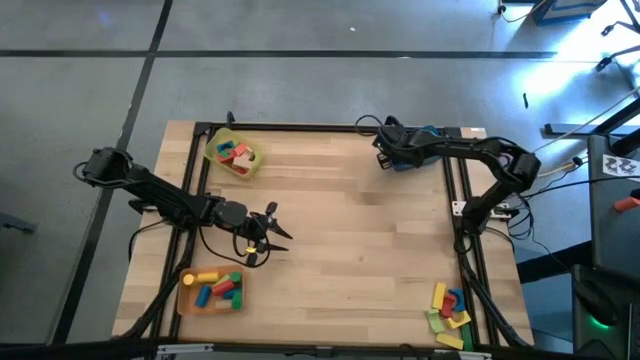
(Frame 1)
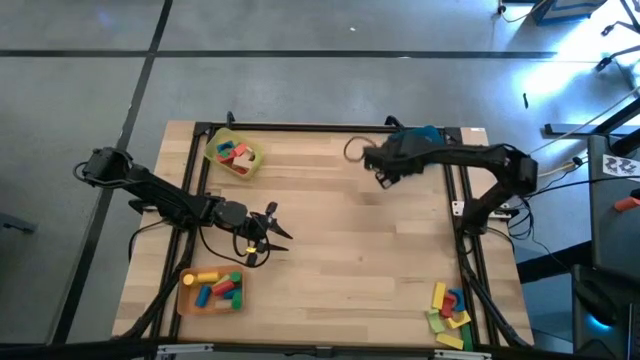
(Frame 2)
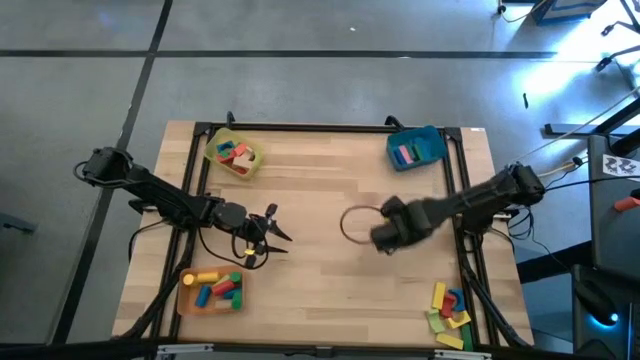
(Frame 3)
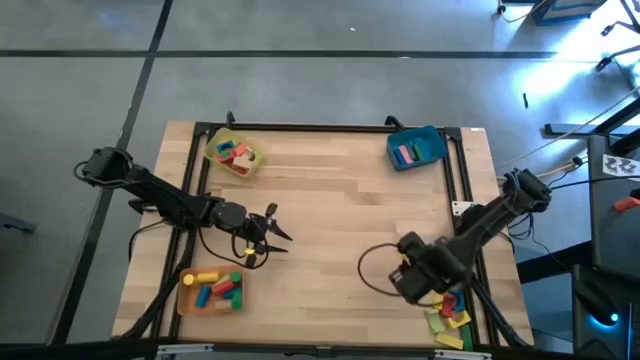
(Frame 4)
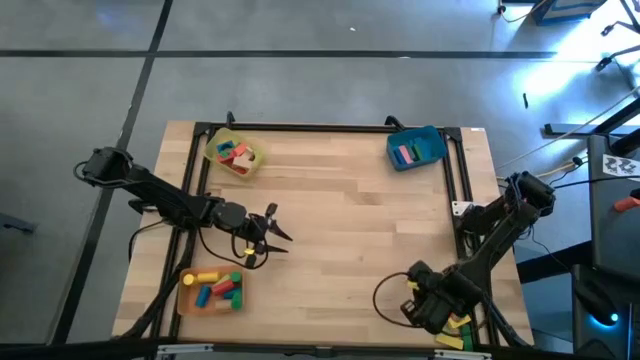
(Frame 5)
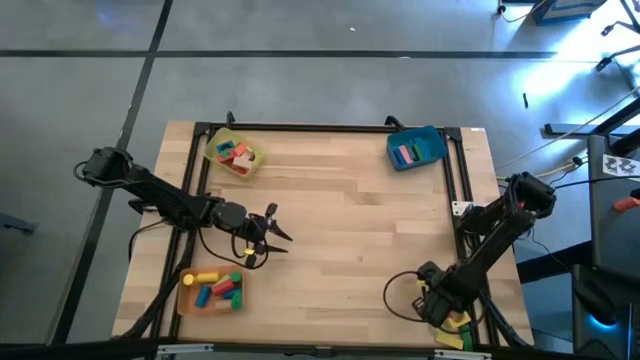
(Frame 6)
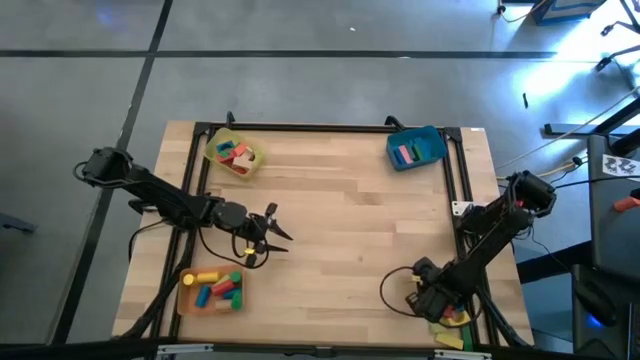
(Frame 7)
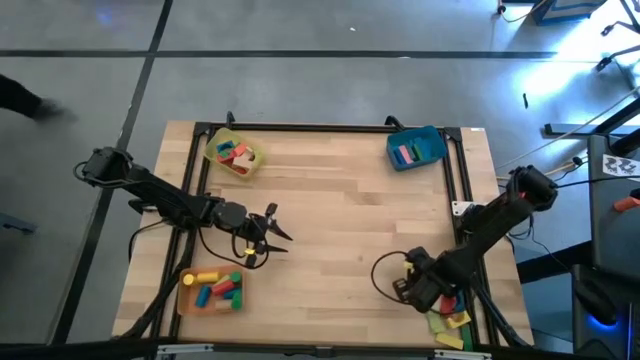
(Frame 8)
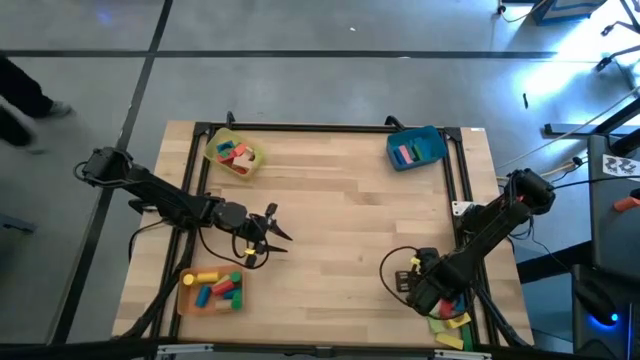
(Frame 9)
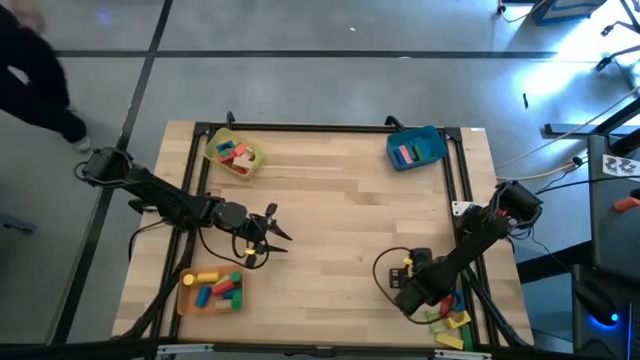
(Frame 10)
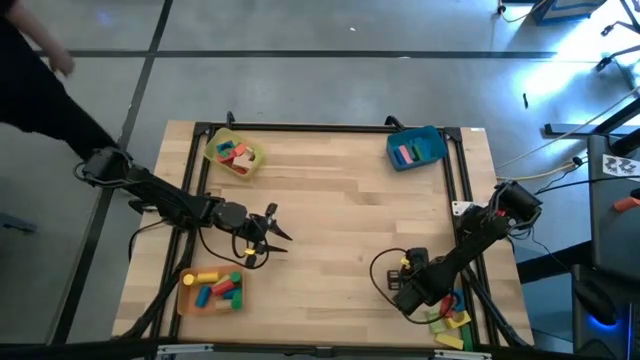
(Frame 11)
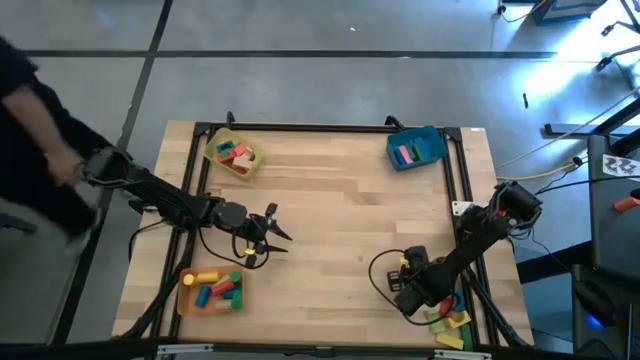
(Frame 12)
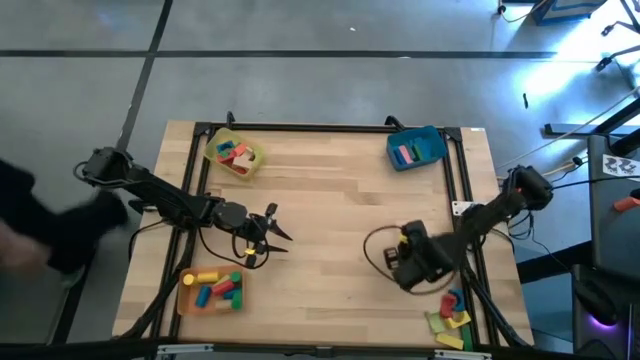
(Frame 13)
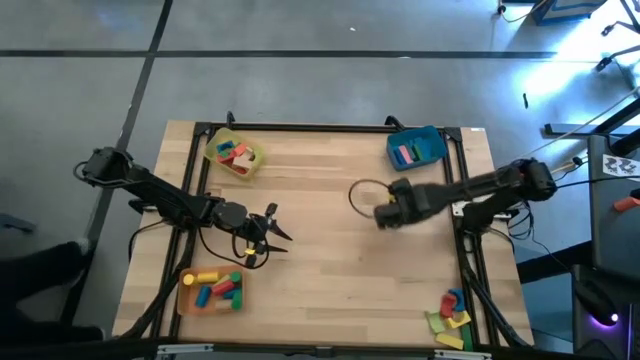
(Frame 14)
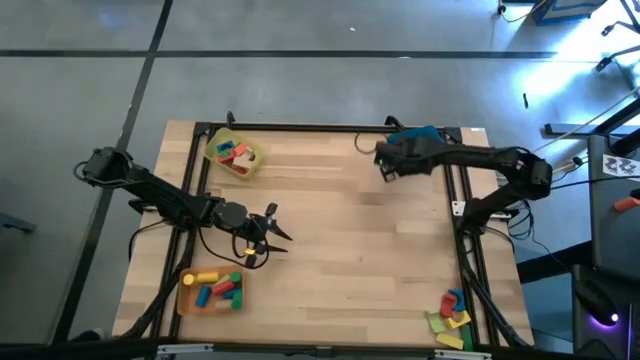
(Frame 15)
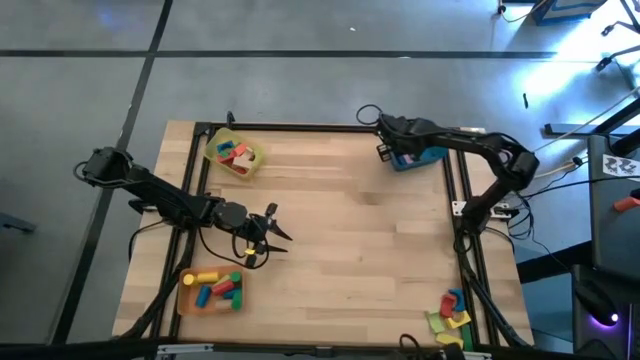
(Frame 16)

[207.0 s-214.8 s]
Task: Sort blocks by size
Put the yellow rectangular block into the blue bin

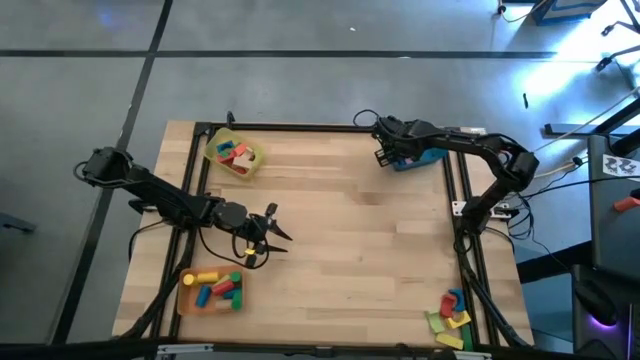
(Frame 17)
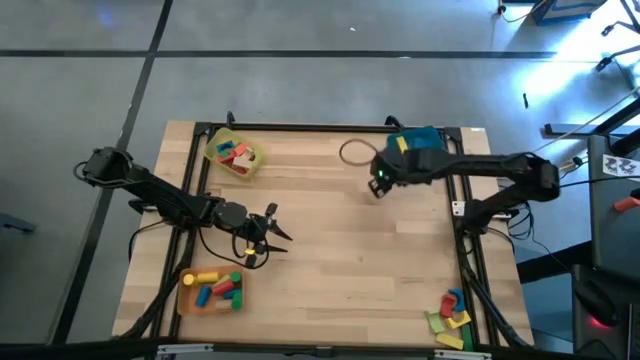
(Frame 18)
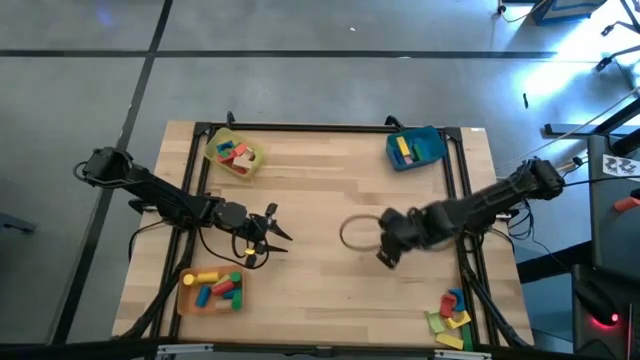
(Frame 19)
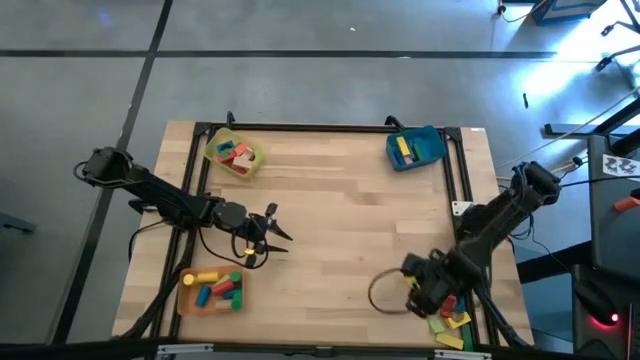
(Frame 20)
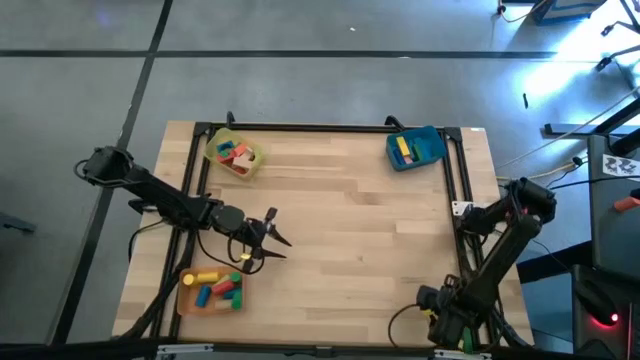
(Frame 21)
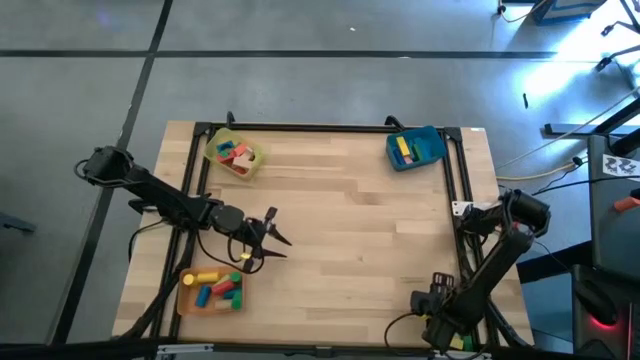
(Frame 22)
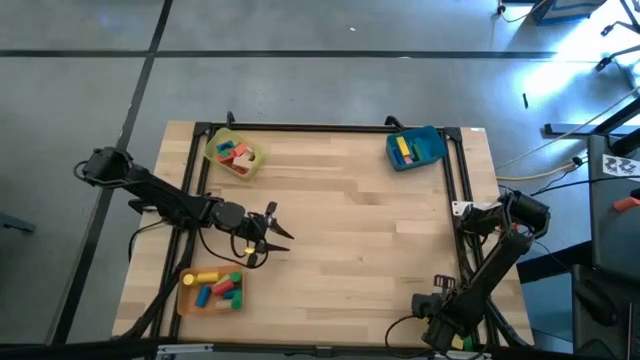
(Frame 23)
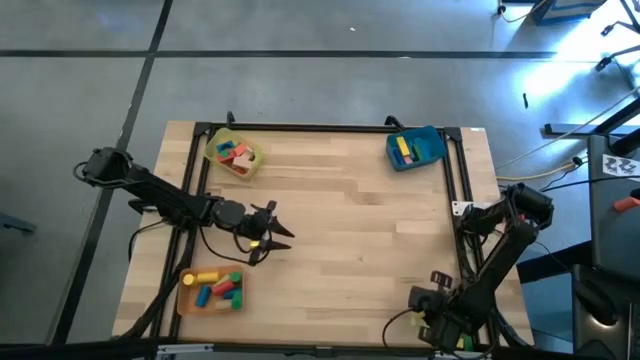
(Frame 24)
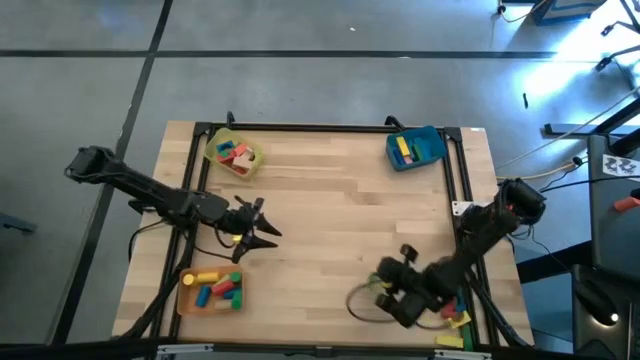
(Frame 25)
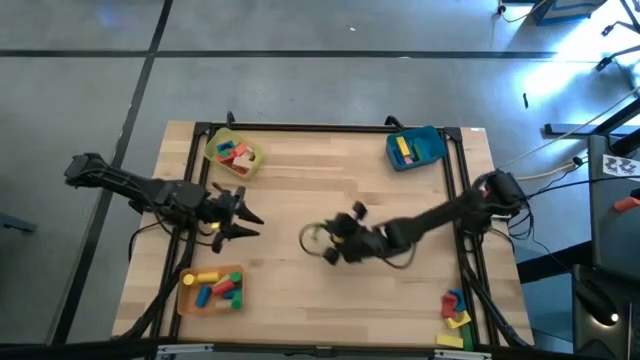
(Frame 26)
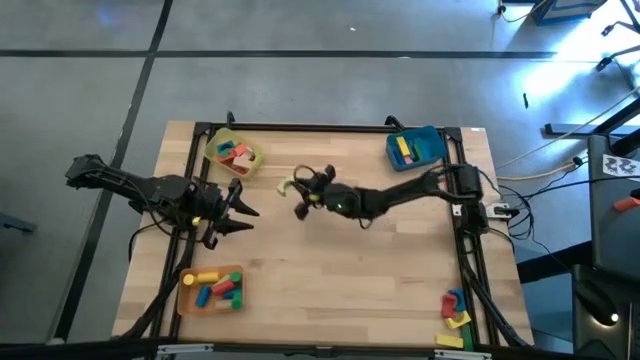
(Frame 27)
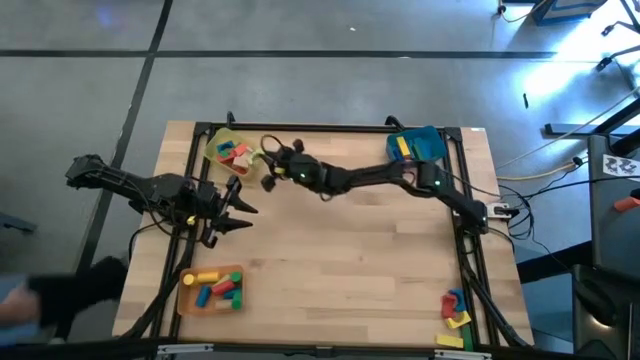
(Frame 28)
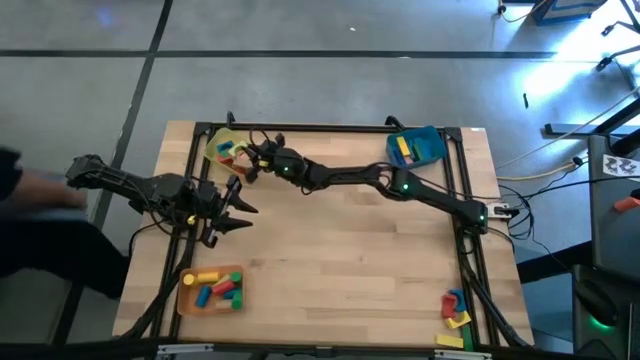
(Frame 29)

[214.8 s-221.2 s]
Put the light green arch block into the yellow bin

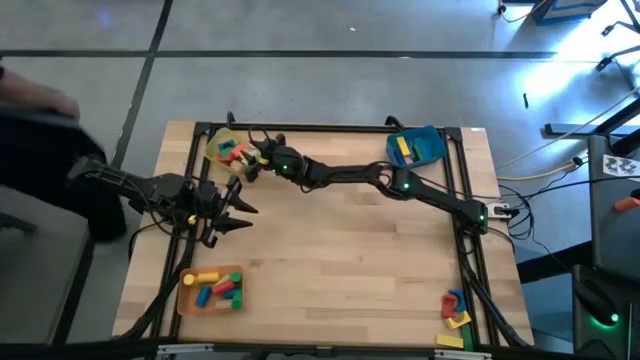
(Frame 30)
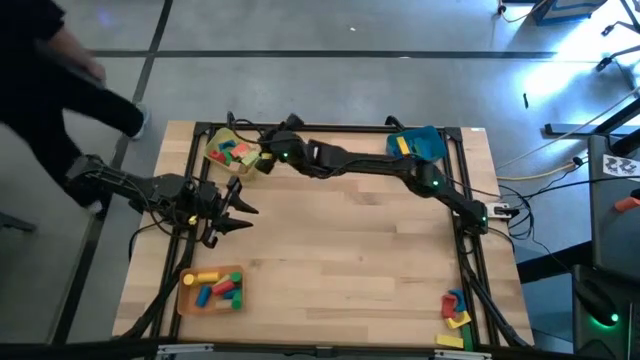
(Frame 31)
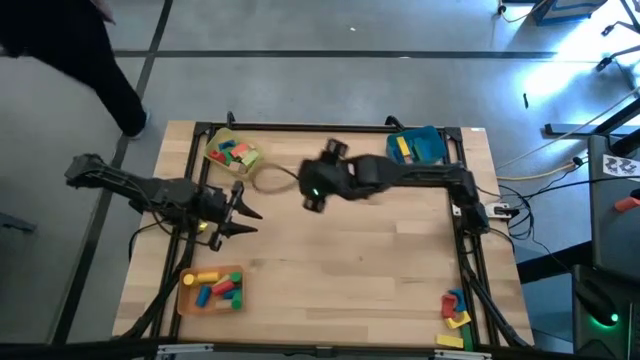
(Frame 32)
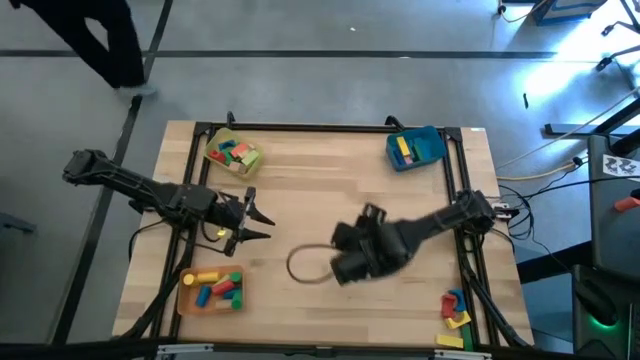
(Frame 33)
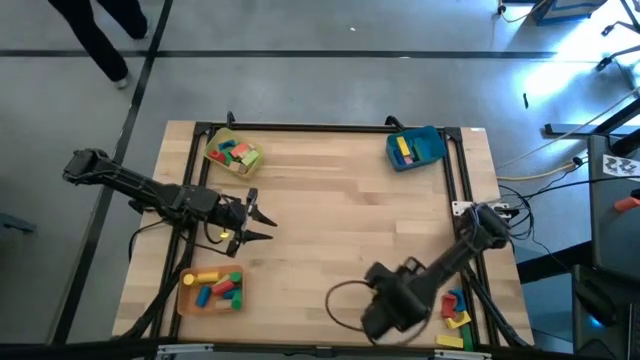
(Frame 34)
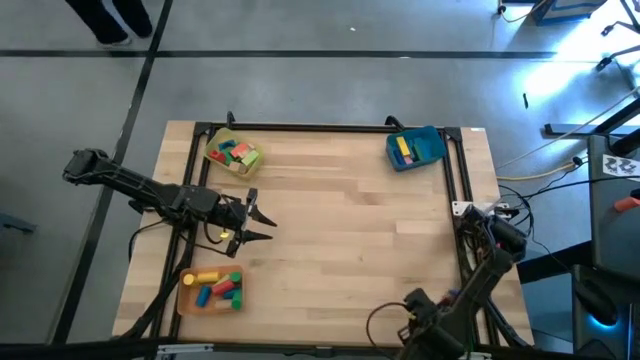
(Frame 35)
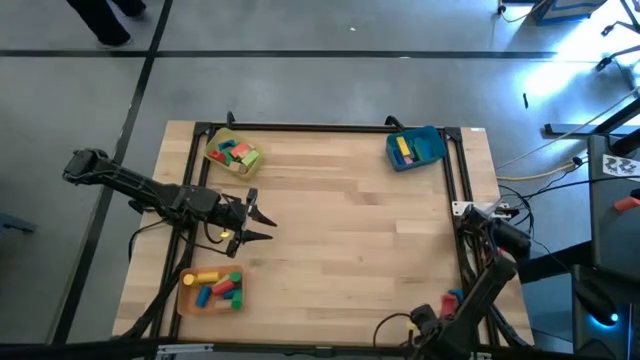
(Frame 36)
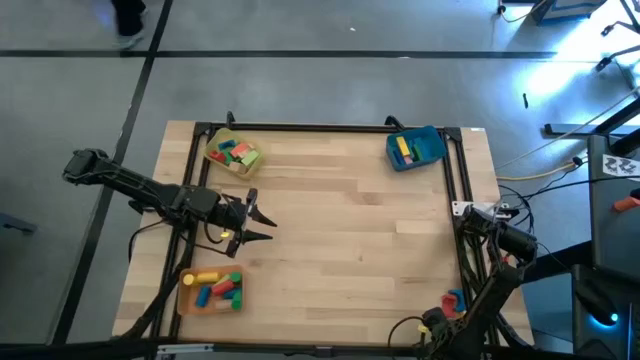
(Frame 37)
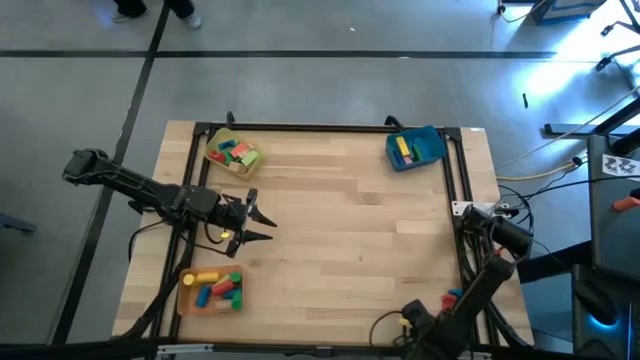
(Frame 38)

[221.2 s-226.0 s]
Adjust the yellow rectangular block

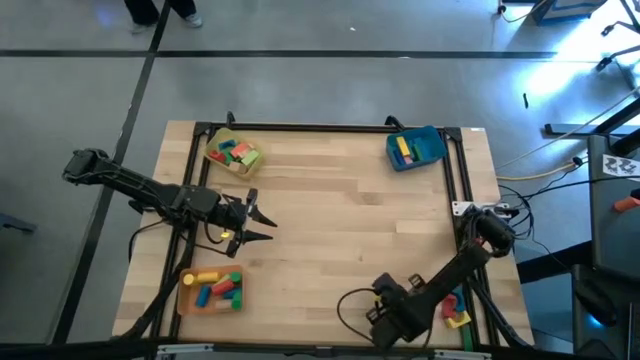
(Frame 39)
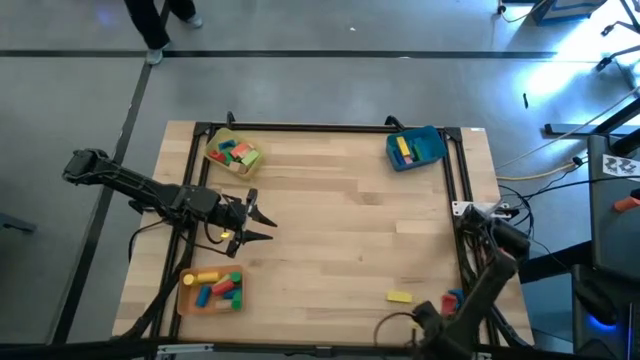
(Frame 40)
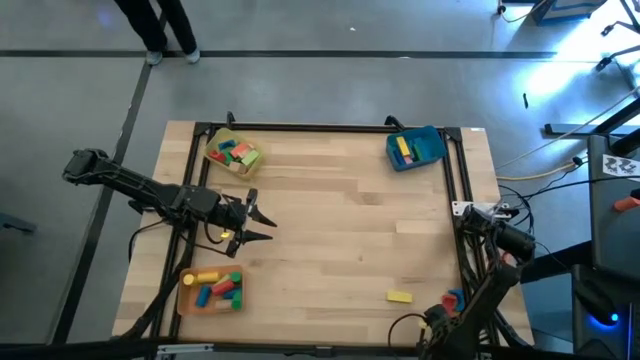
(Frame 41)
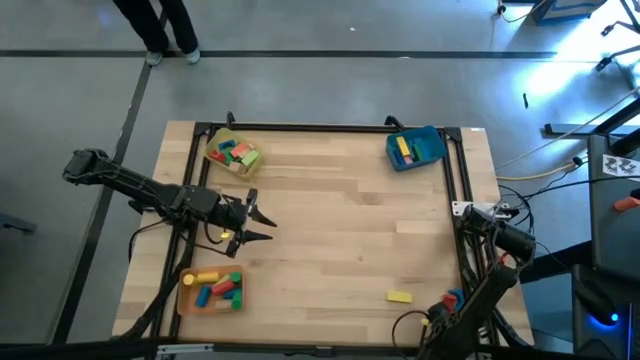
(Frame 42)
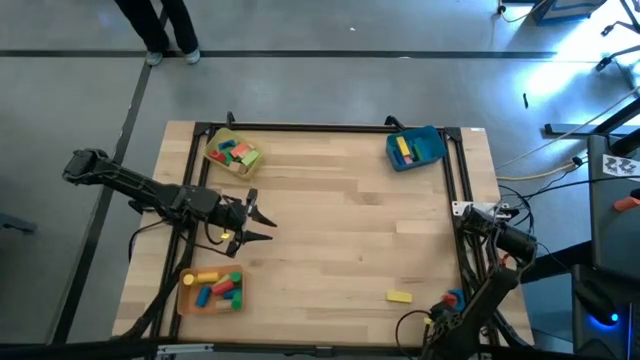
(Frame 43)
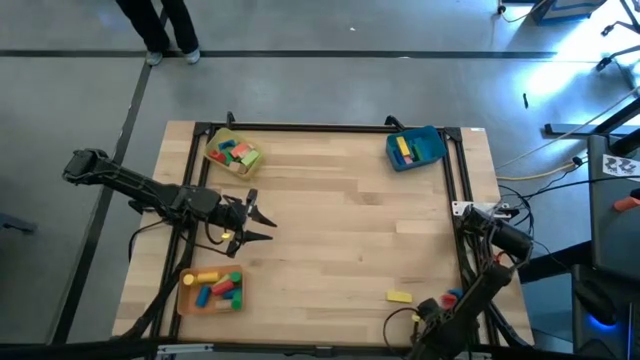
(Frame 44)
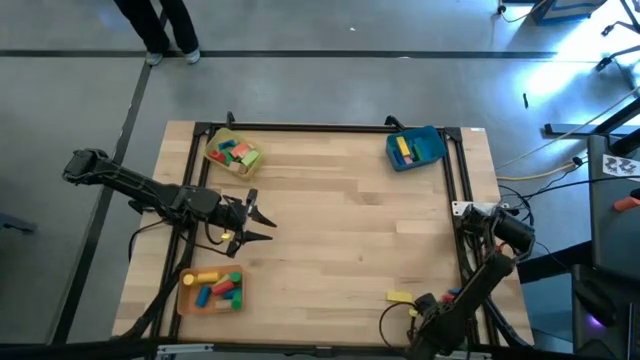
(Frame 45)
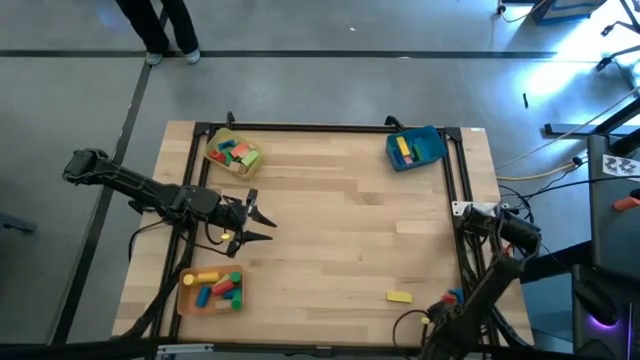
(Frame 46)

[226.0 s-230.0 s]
Put the green rectangular block into the blue bin
